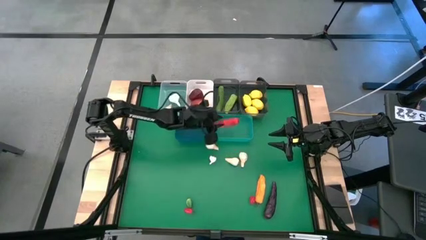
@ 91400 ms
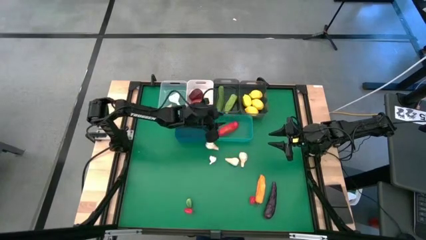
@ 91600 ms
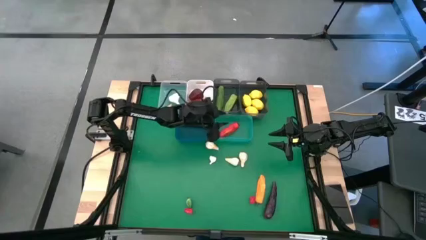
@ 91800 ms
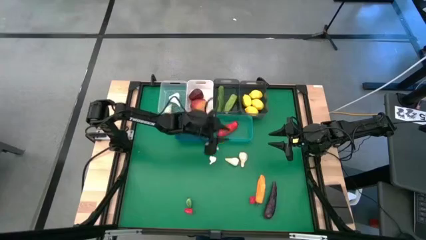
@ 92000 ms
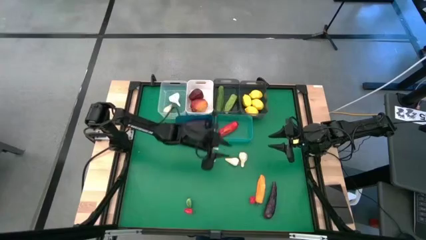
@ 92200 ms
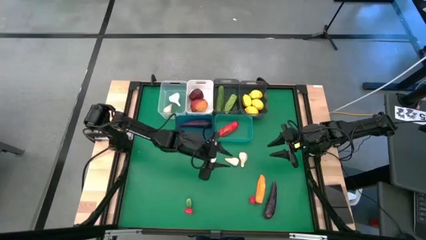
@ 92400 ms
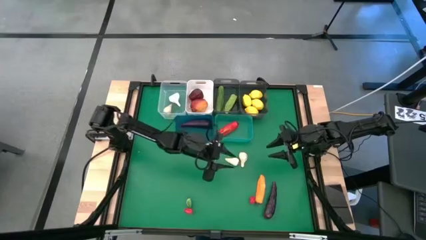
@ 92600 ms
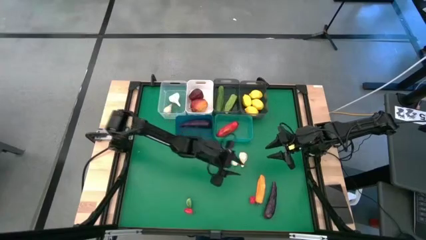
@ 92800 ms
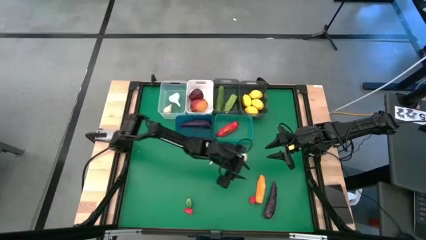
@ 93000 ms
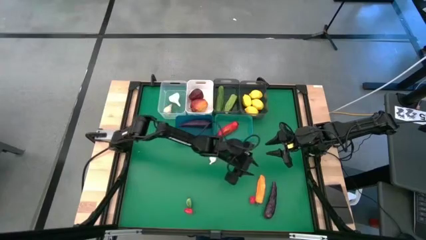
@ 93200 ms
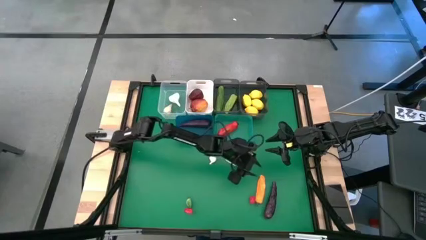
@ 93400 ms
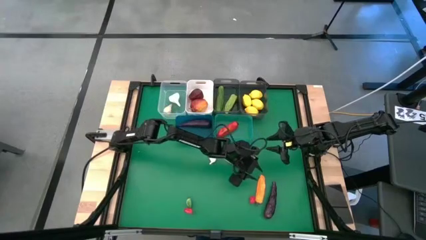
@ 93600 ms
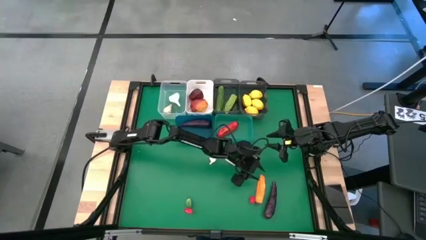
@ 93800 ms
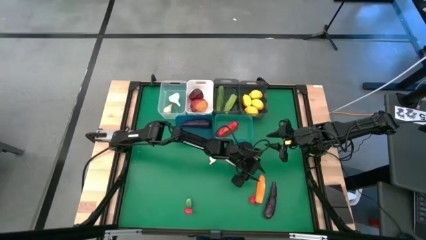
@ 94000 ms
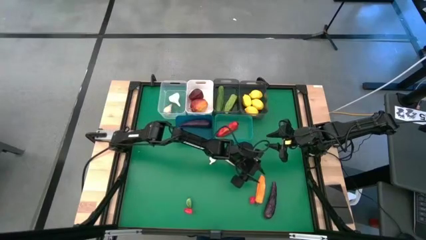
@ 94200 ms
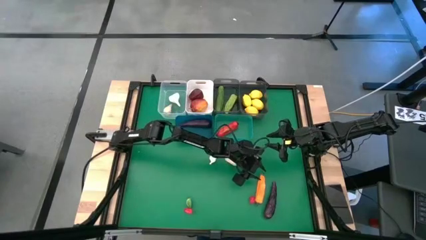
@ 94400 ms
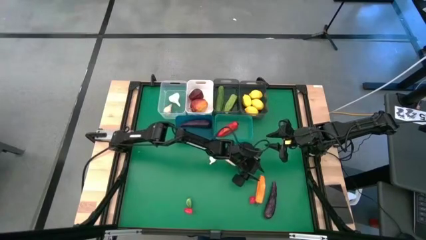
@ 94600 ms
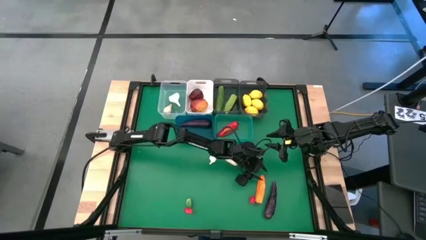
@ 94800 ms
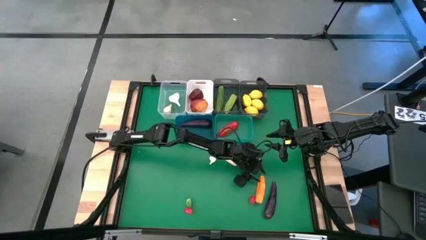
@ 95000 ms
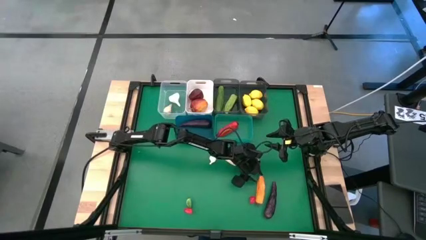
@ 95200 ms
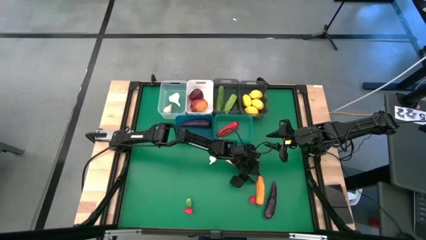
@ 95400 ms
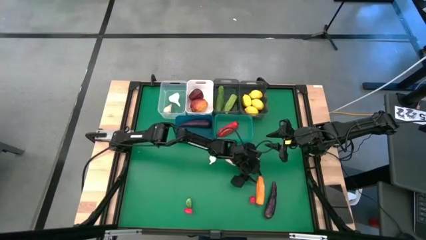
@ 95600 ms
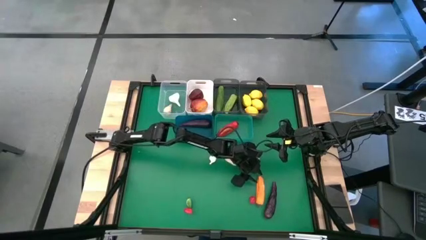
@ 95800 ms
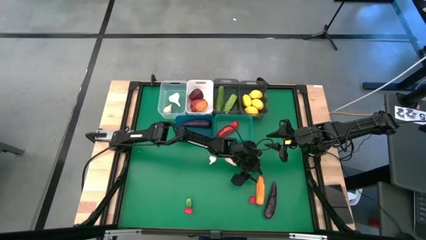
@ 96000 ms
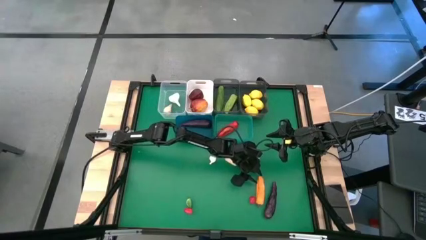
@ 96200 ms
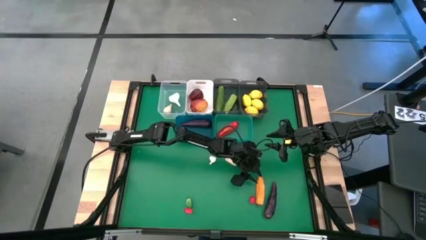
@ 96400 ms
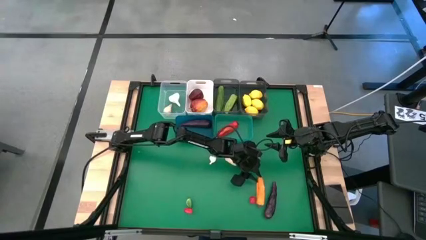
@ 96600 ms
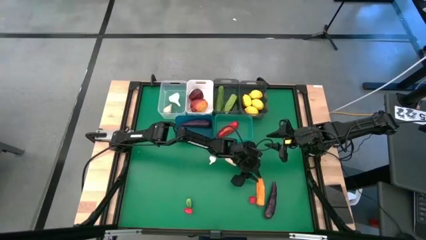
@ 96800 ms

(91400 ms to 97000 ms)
Task: Sort produce into baskets
Put the orange chili pepper into the light blue bin

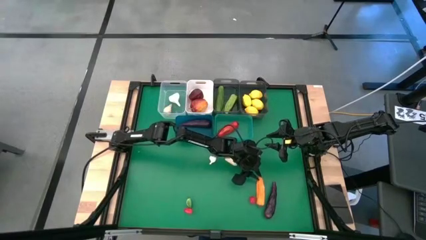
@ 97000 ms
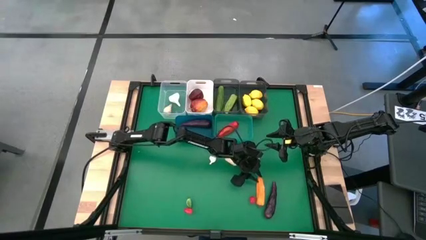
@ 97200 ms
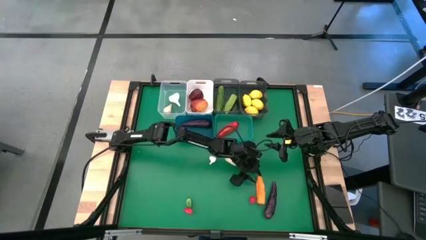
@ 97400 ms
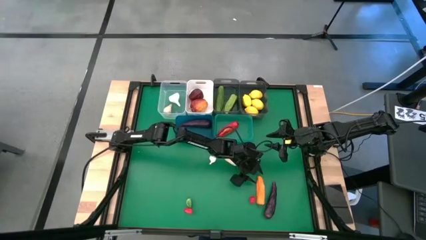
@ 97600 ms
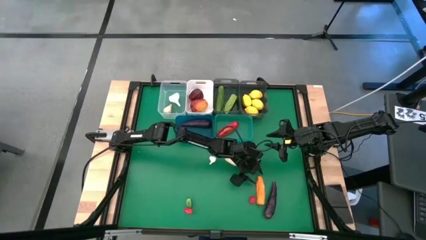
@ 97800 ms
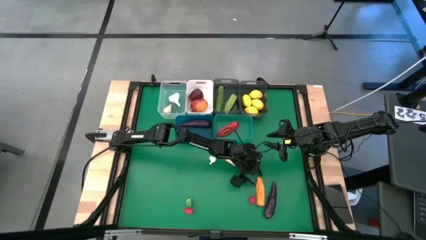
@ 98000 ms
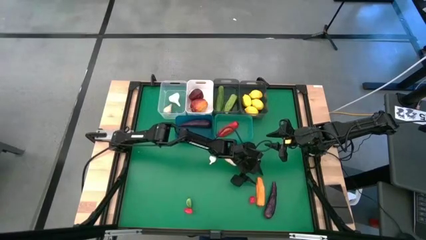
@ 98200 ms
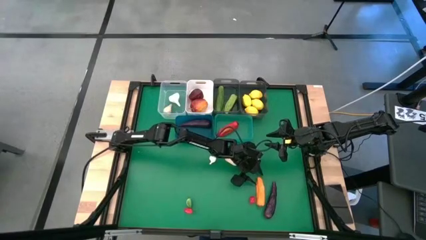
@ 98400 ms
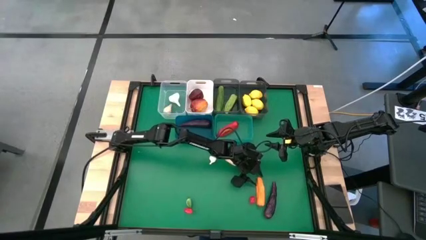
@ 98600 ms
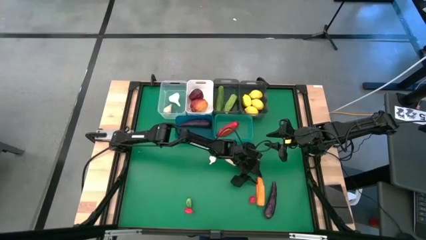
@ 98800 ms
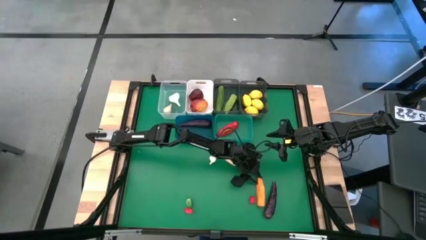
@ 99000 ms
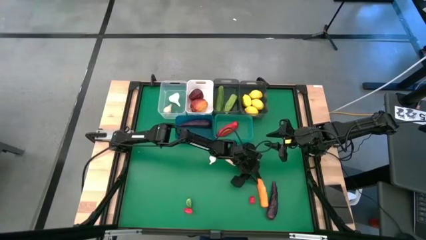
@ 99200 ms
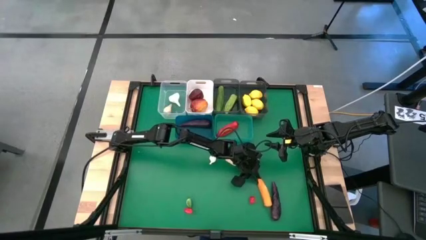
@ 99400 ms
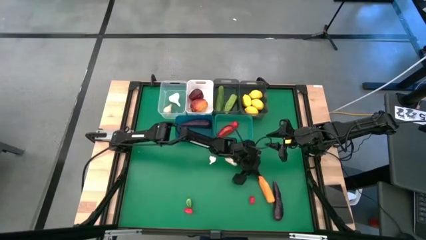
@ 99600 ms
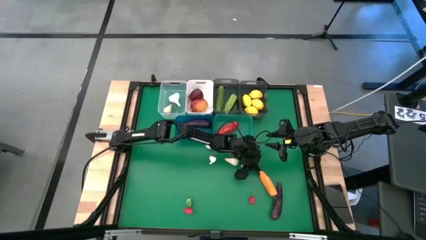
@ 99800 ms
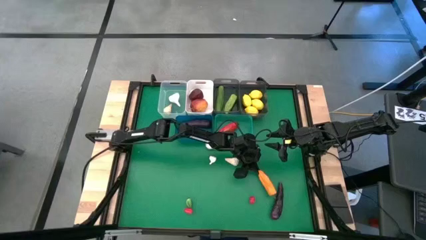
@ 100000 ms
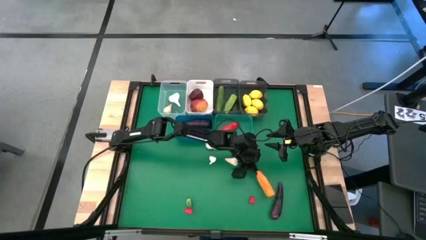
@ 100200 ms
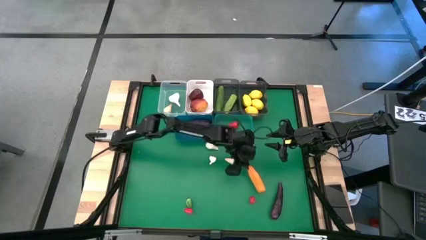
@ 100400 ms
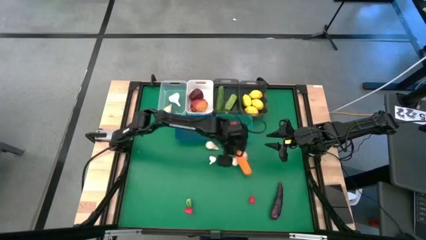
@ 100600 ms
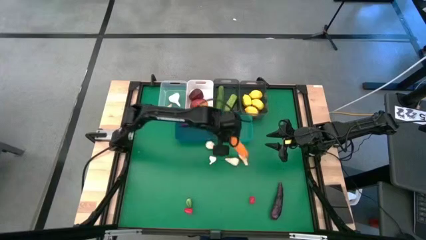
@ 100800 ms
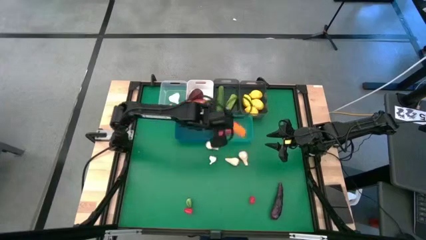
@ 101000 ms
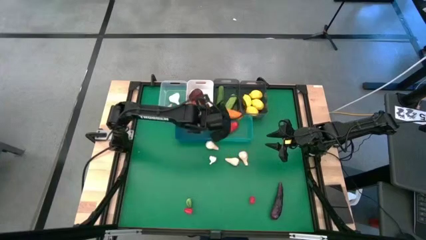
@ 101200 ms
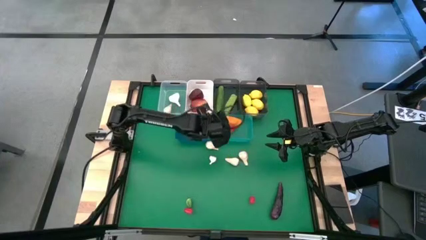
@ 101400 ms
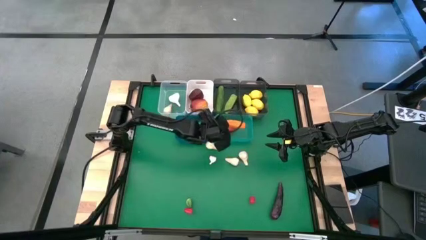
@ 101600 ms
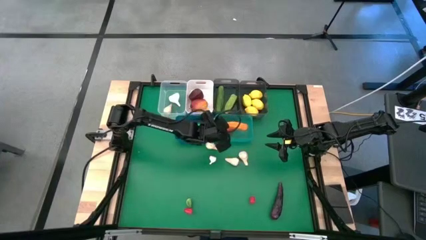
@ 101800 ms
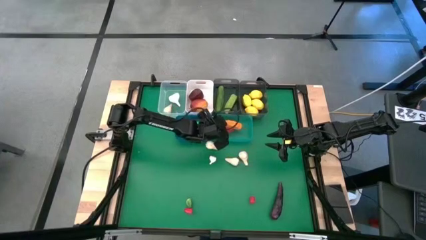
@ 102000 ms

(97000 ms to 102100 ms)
Put the orange chili pepper into the light blue bin

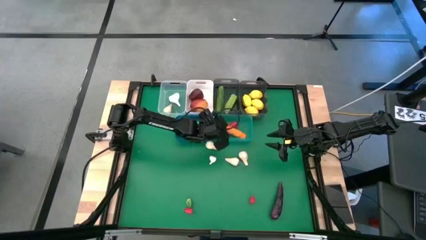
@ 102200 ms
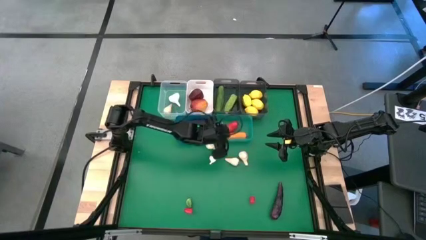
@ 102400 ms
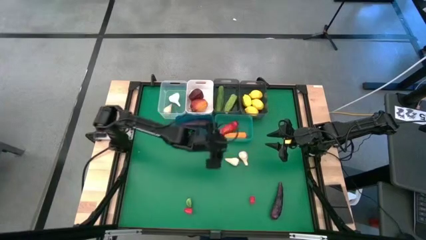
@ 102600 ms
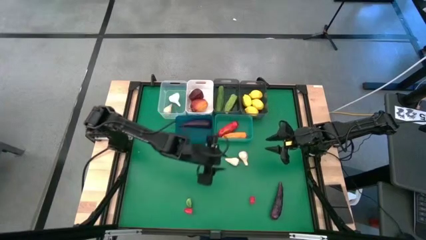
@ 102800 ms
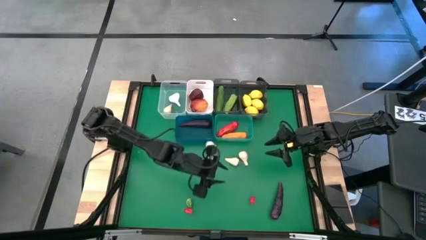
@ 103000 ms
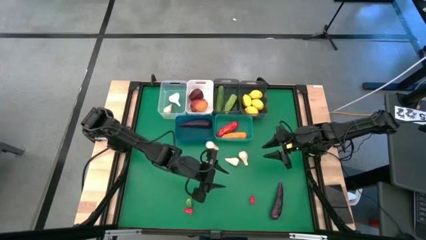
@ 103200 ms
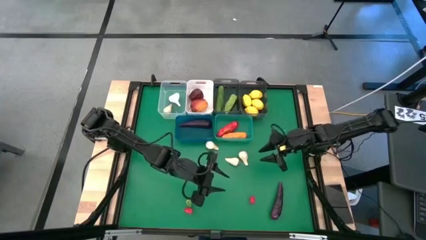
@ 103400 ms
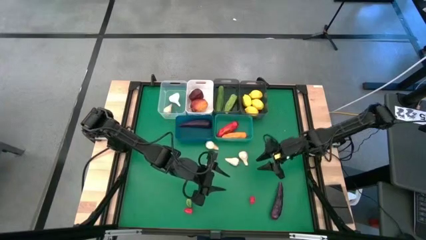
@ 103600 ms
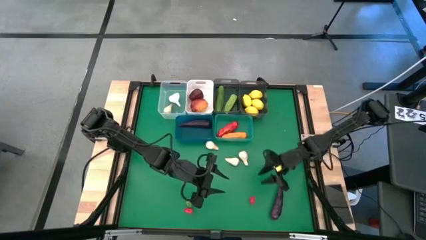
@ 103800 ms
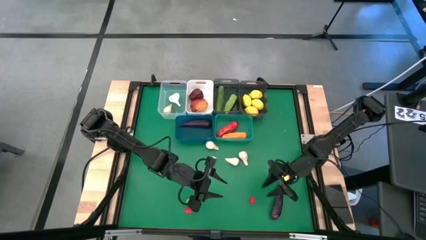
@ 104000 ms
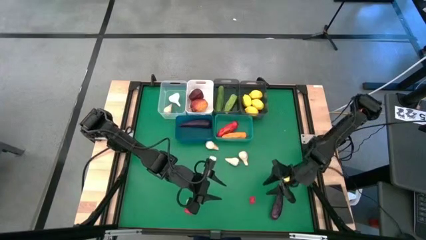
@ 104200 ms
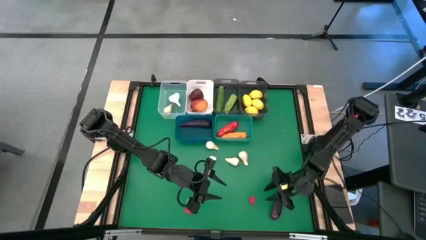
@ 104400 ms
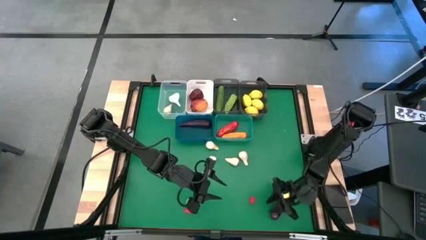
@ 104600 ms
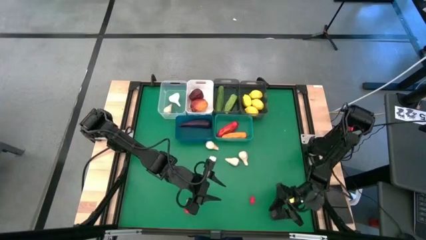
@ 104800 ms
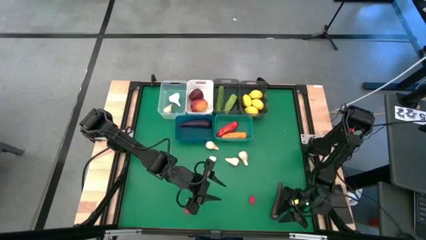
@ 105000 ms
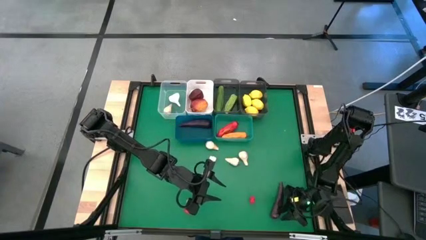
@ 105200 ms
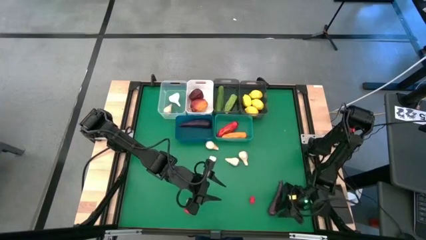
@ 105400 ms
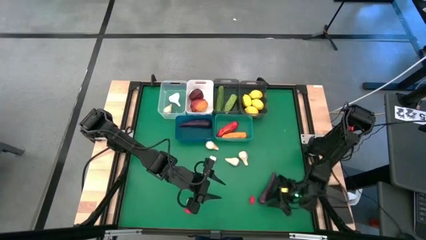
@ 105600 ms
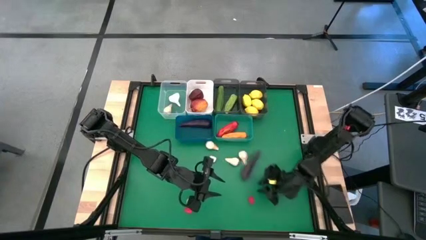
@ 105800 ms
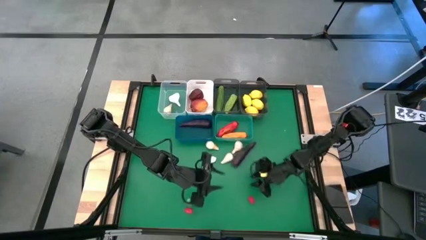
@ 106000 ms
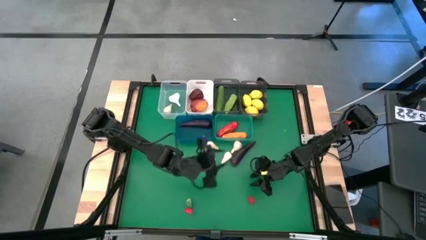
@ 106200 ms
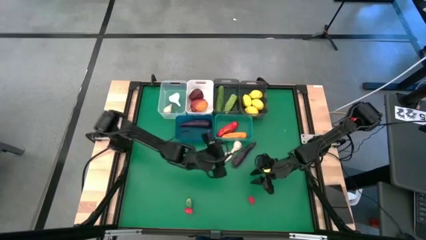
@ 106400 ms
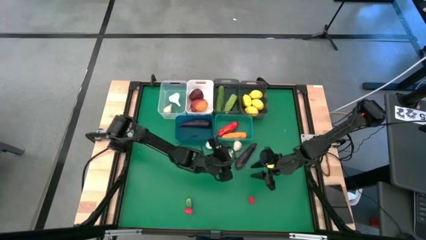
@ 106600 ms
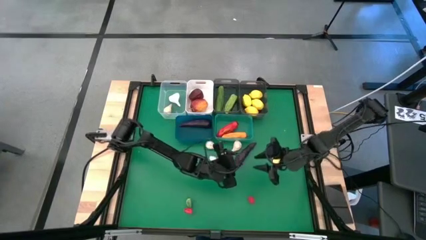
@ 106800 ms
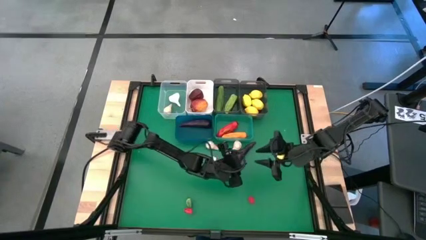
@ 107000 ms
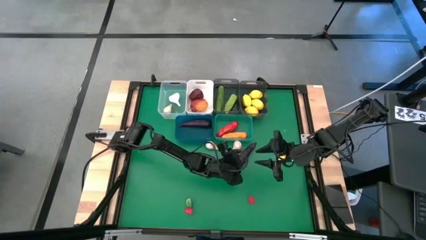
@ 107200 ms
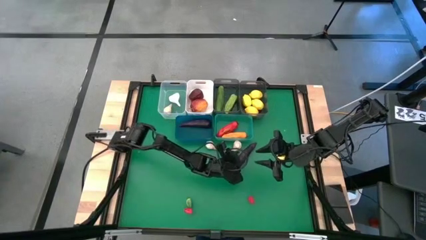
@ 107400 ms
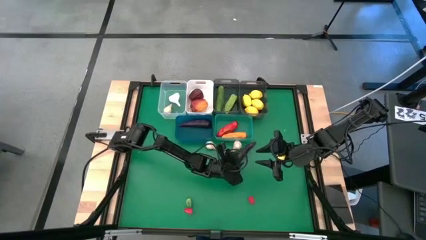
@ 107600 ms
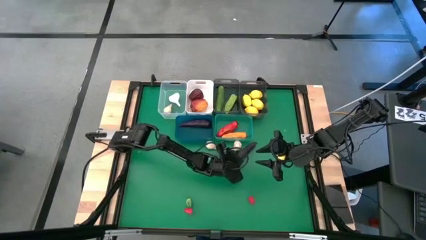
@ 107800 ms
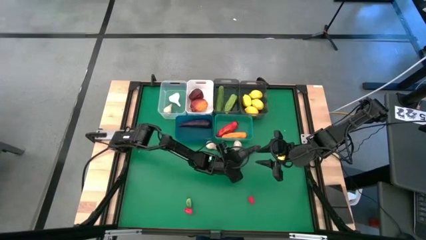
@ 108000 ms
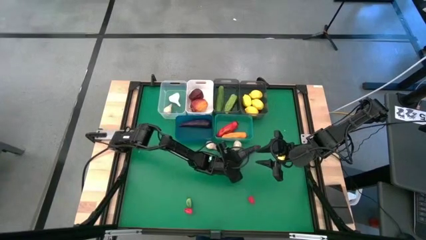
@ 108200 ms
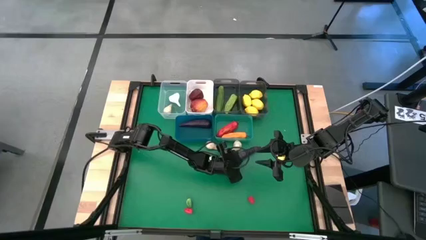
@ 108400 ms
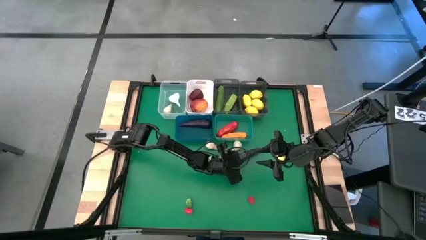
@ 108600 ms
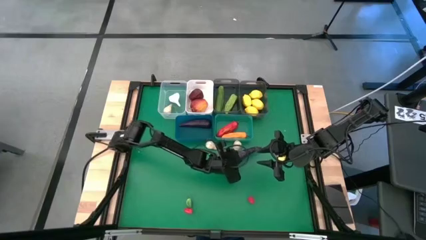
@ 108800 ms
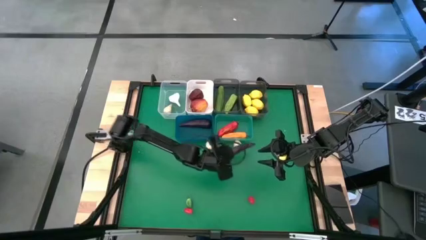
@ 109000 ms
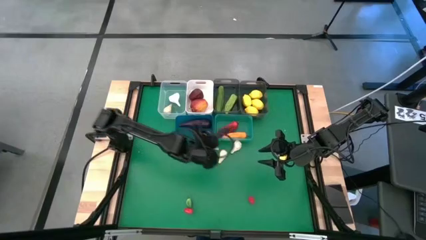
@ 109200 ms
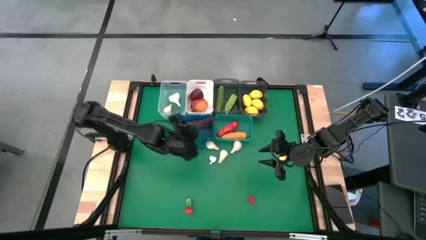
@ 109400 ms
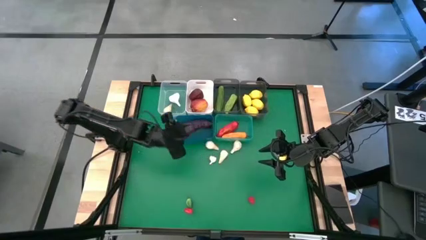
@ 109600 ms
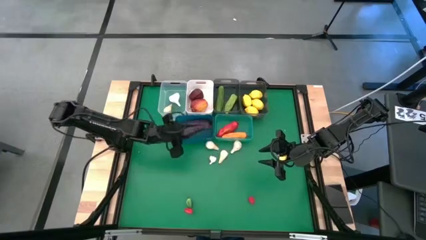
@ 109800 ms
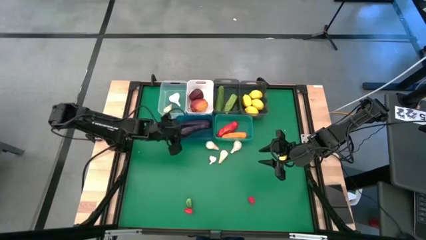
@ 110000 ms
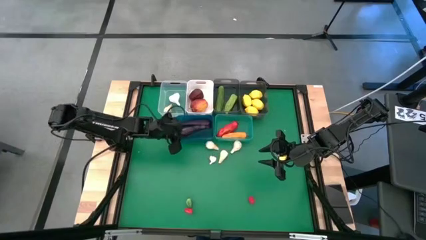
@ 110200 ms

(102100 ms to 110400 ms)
Put the eggplant into the dark blue bin
